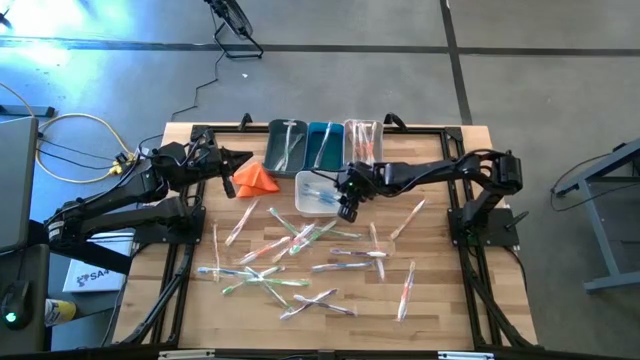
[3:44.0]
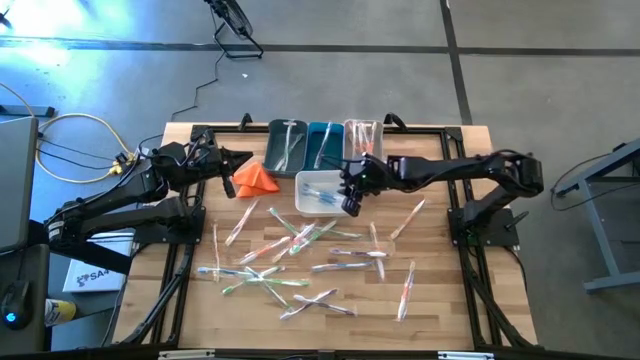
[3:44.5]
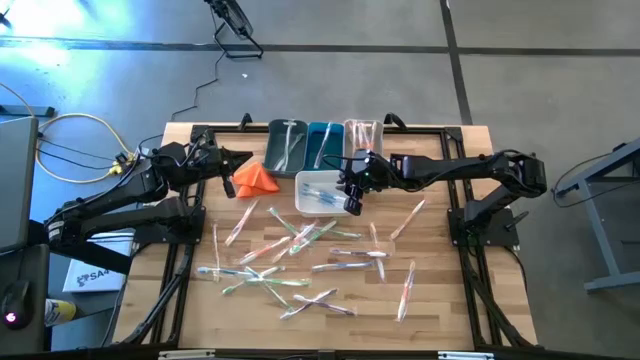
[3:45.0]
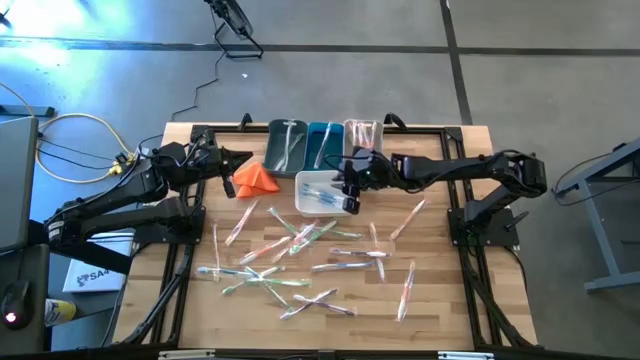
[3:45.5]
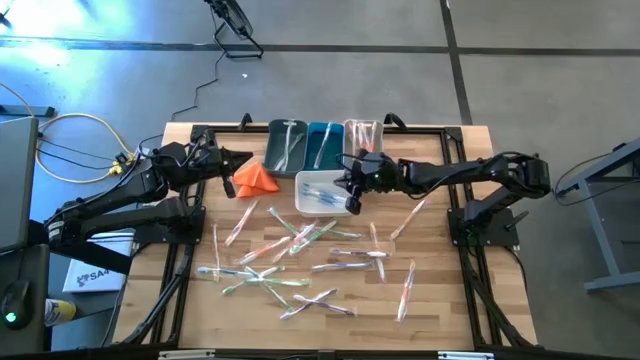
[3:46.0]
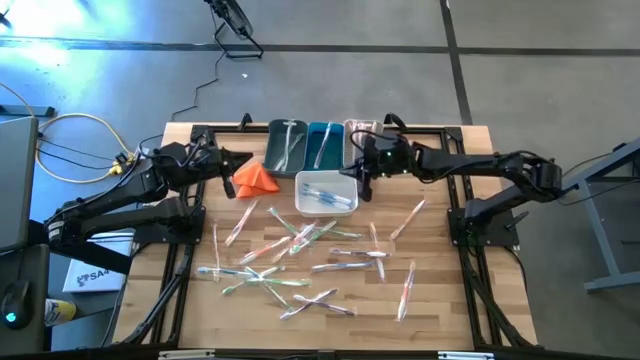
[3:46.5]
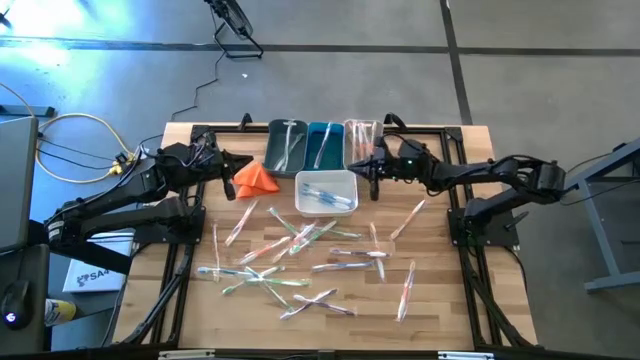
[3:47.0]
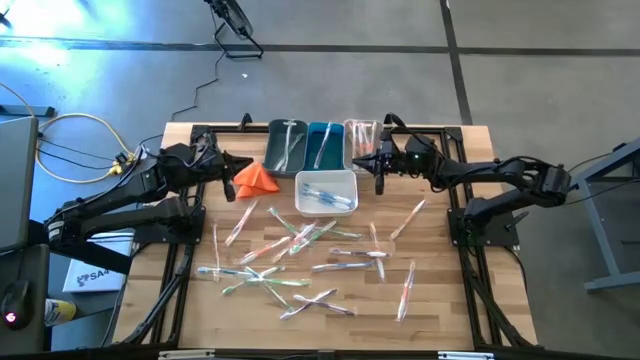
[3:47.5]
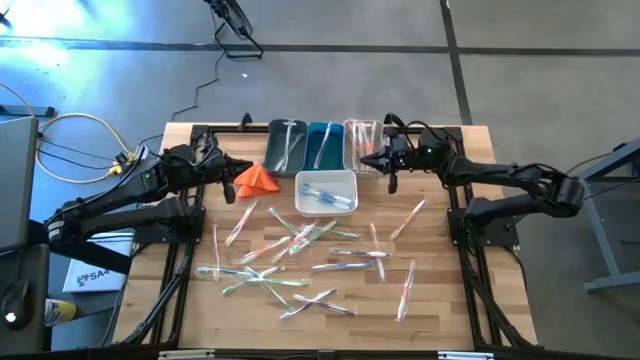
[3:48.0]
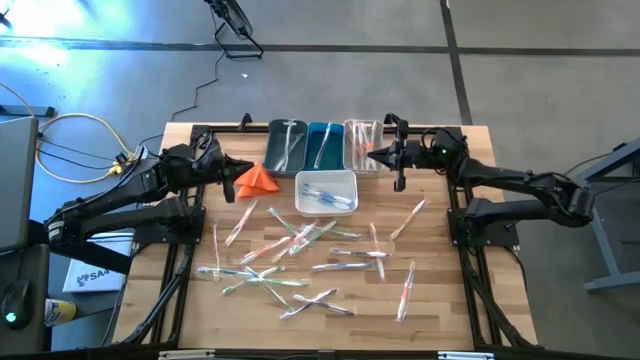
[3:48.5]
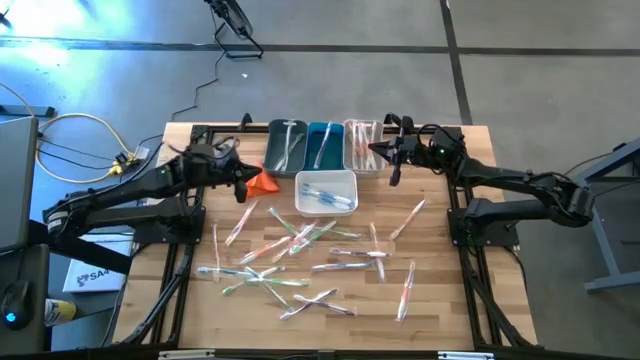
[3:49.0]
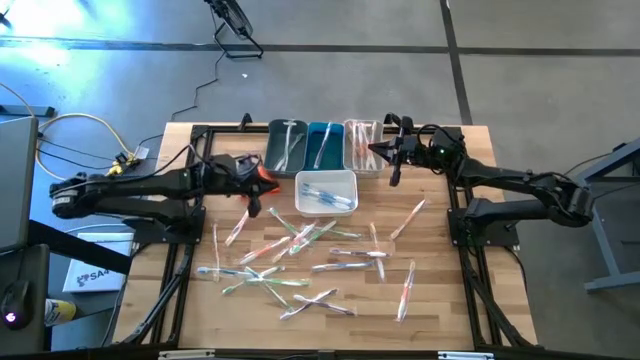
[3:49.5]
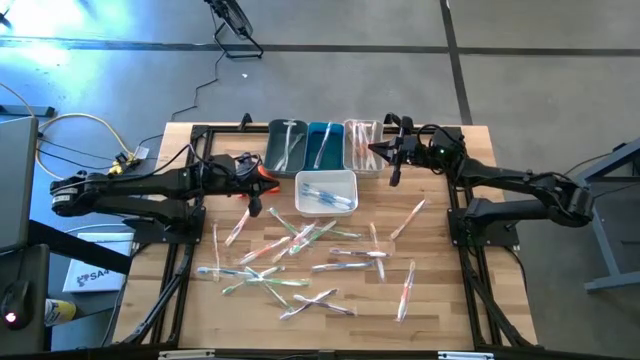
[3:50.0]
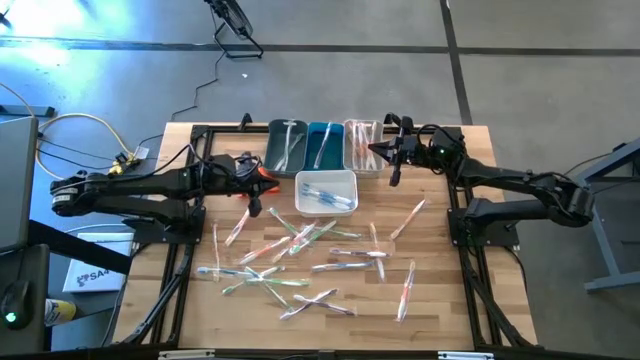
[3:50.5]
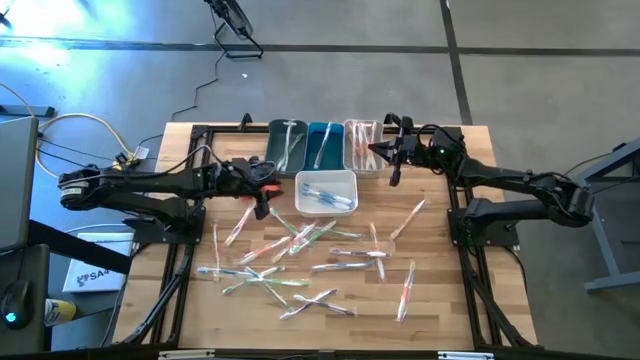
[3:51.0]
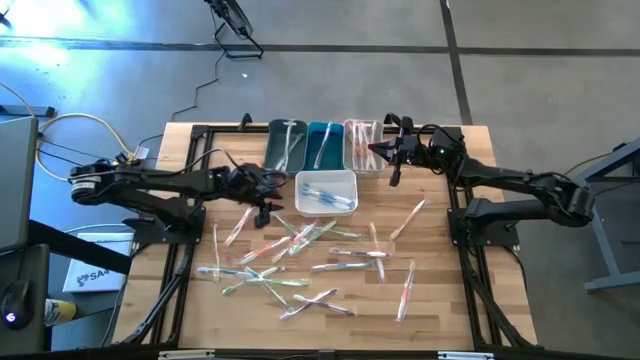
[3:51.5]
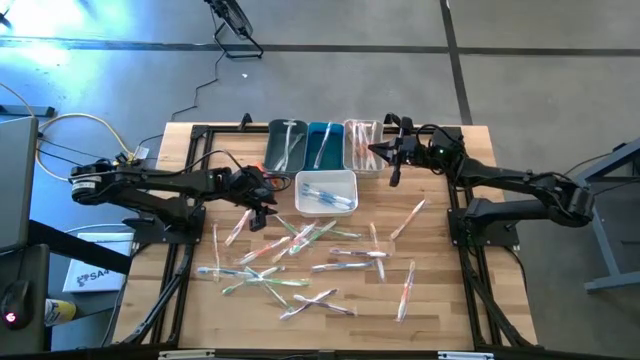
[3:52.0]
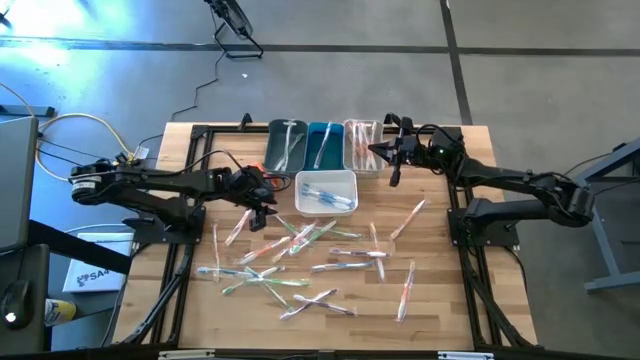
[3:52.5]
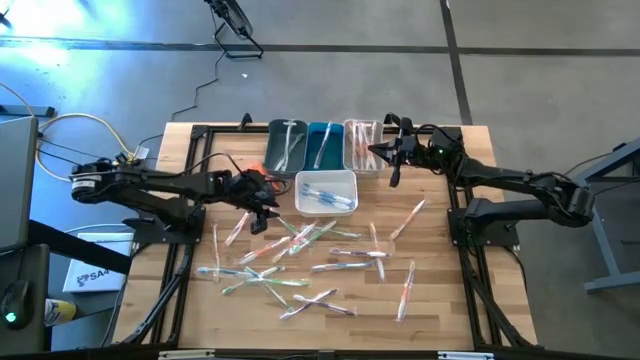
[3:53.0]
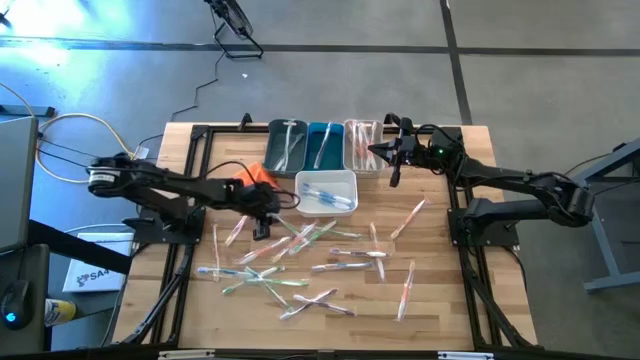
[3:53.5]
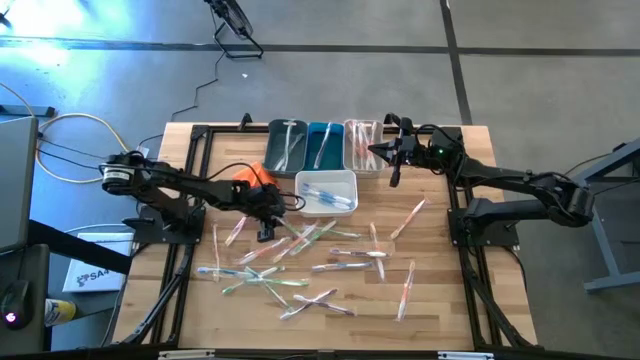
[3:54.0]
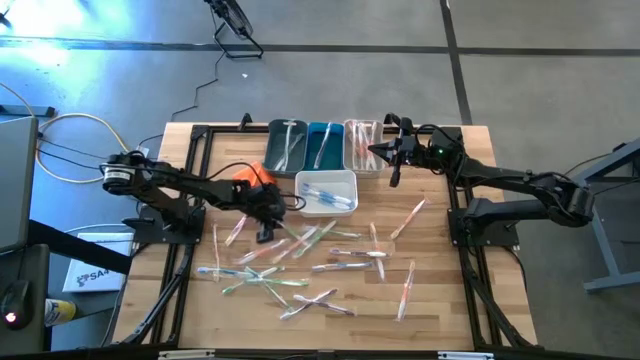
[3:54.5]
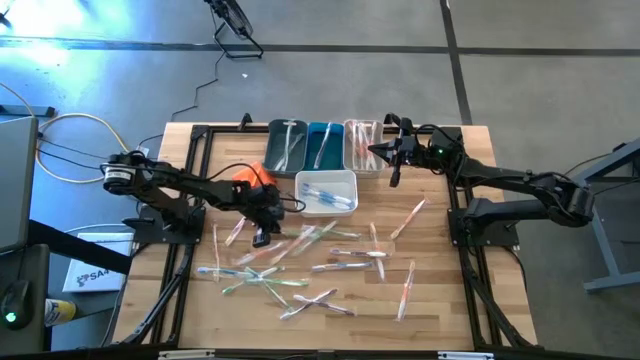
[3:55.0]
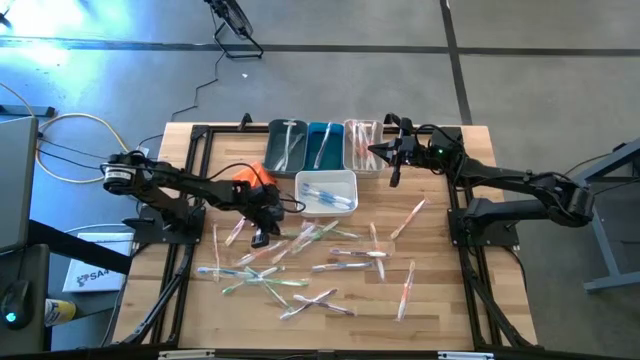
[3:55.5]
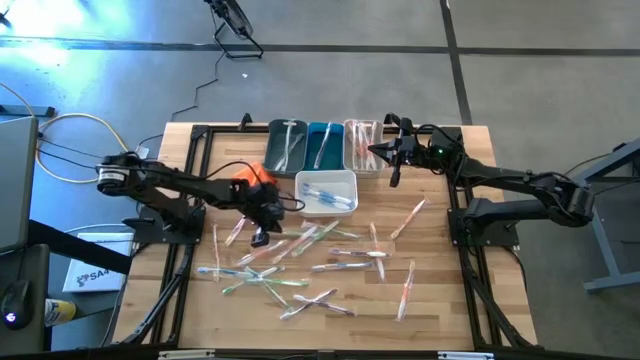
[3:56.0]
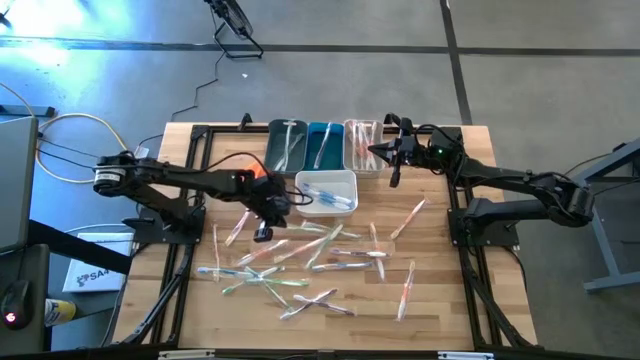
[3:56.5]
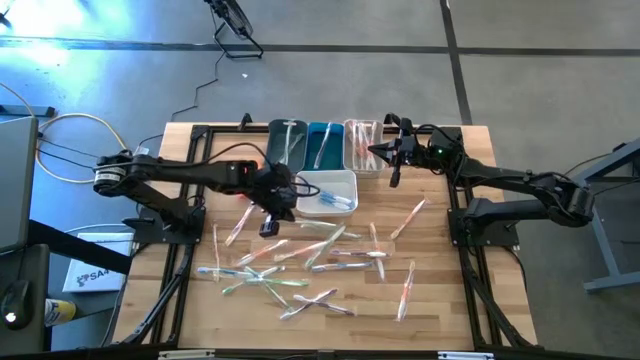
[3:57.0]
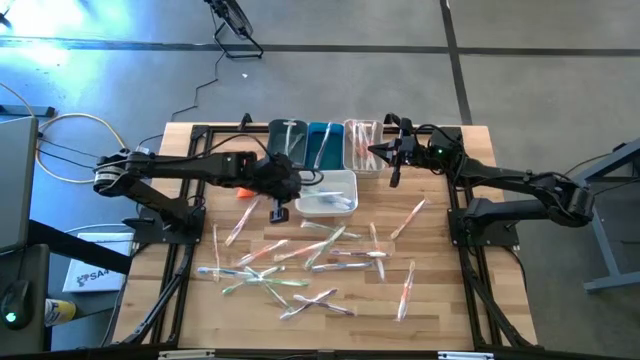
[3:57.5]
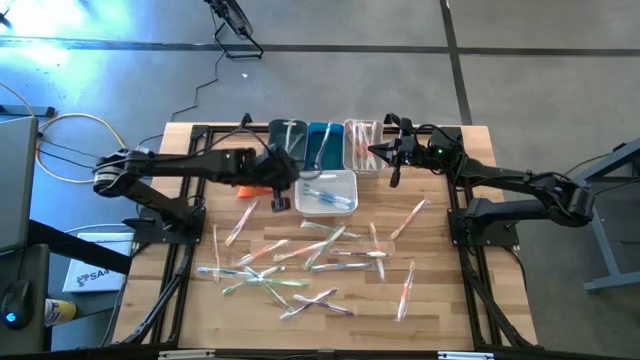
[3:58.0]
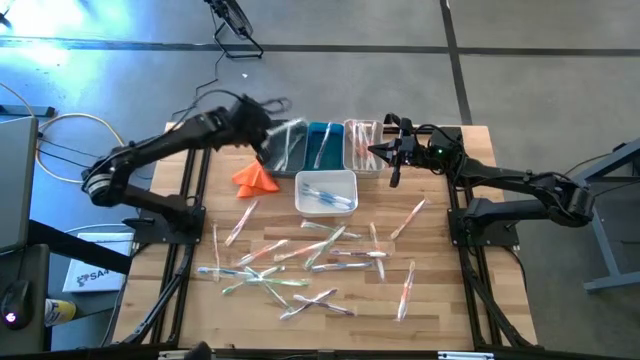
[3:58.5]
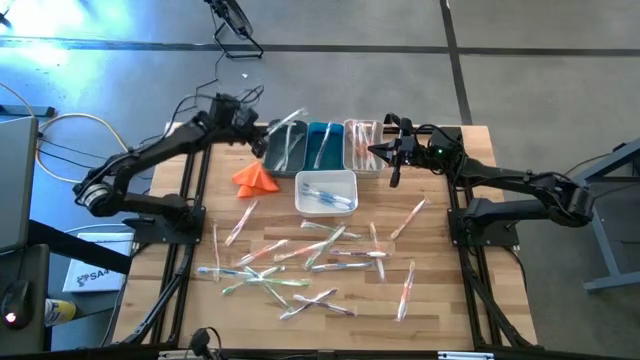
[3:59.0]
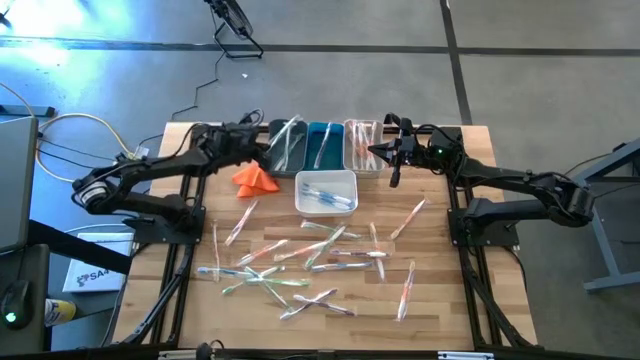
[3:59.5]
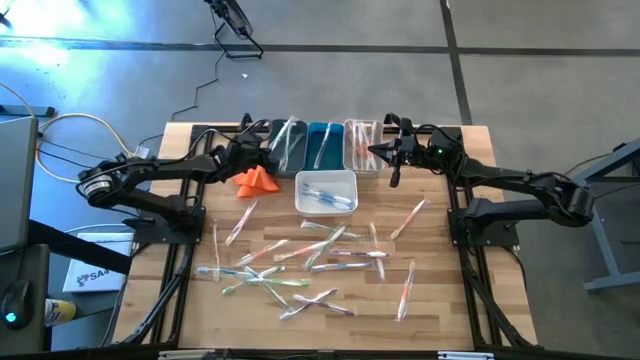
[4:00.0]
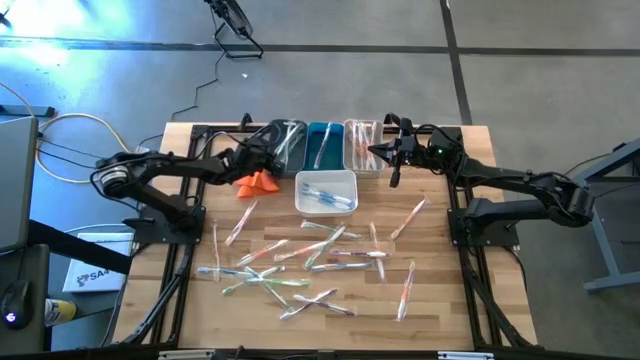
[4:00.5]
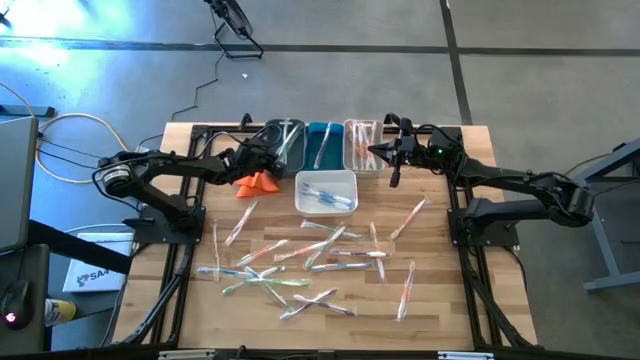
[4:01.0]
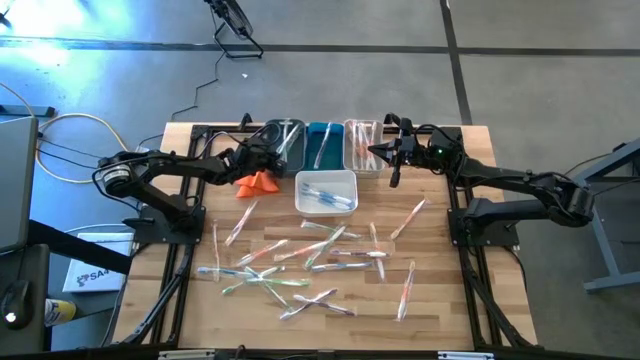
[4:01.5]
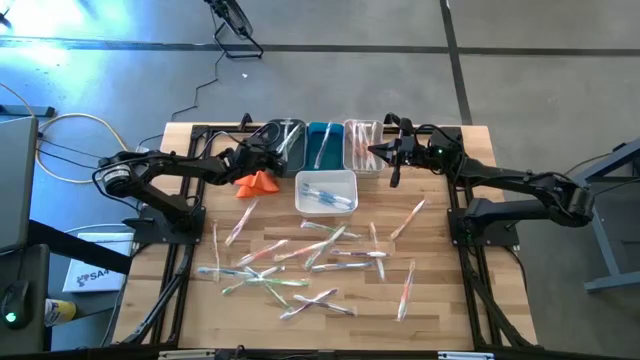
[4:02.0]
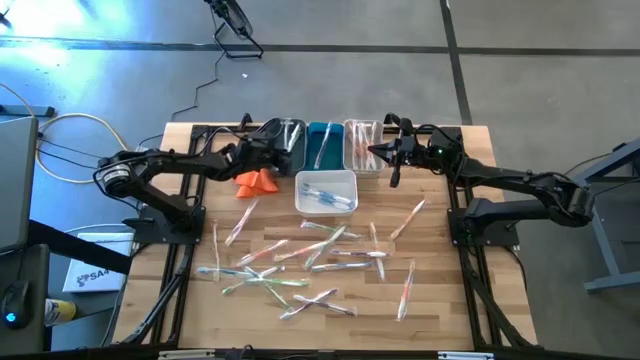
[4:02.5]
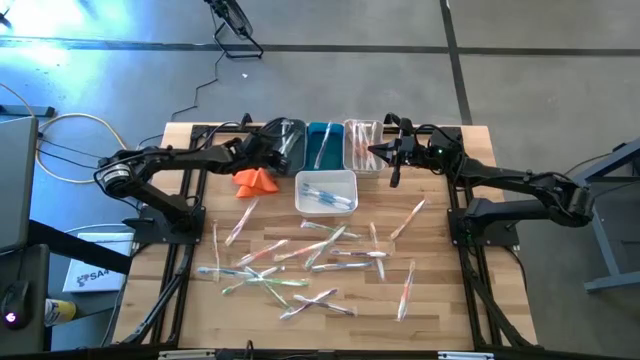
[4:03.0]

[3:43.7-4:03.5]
Task: Pick & Place Toothbrushes
Put the green toothbrush into the dark blue bin

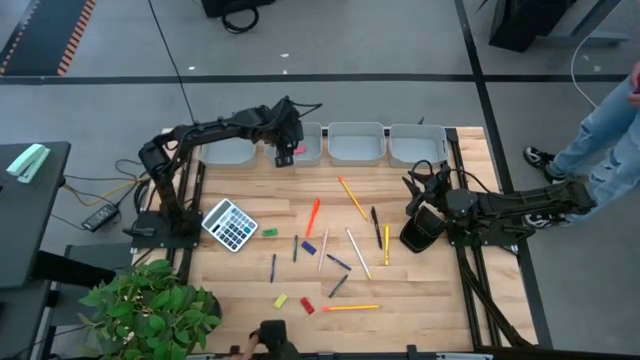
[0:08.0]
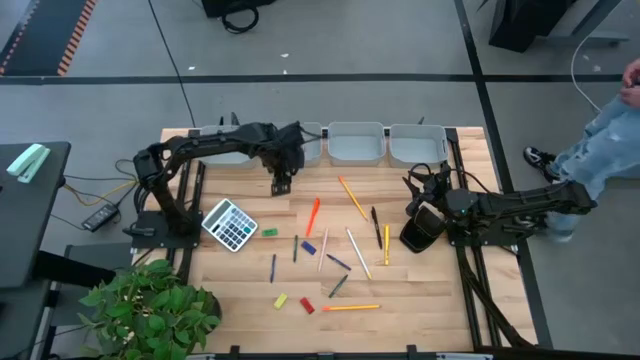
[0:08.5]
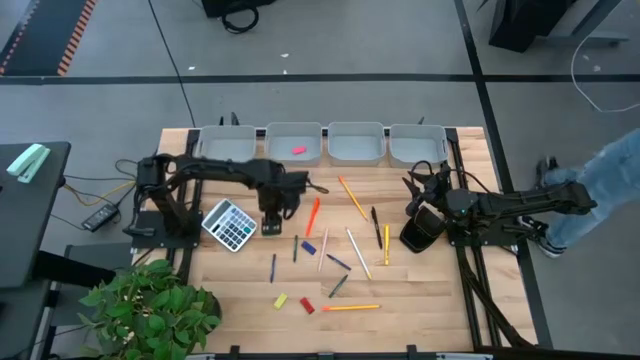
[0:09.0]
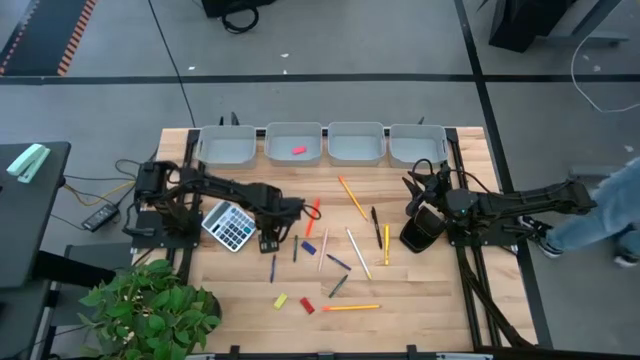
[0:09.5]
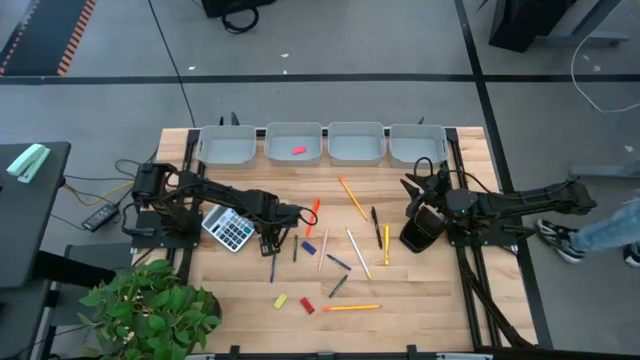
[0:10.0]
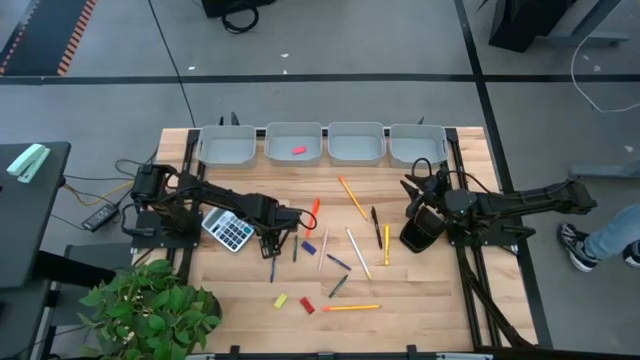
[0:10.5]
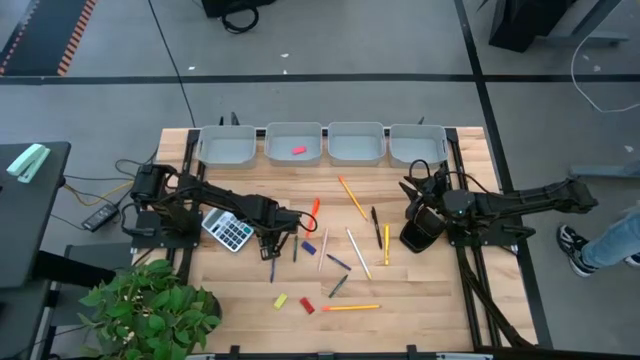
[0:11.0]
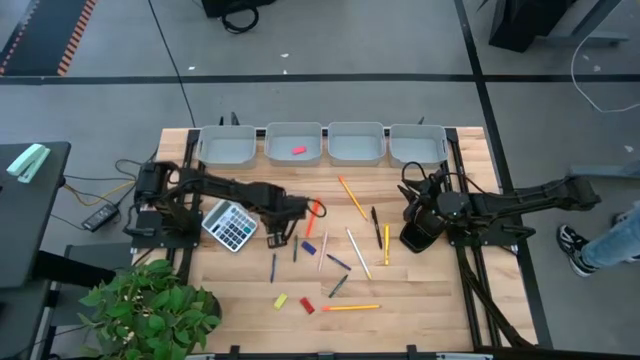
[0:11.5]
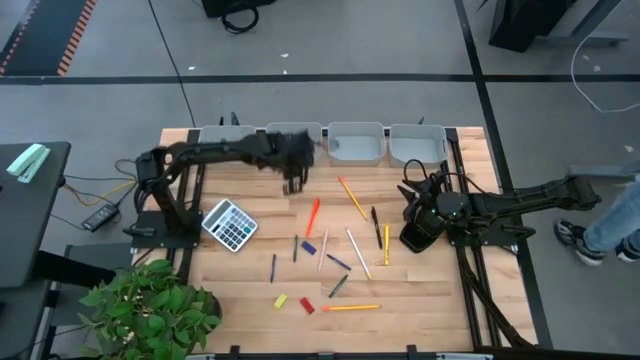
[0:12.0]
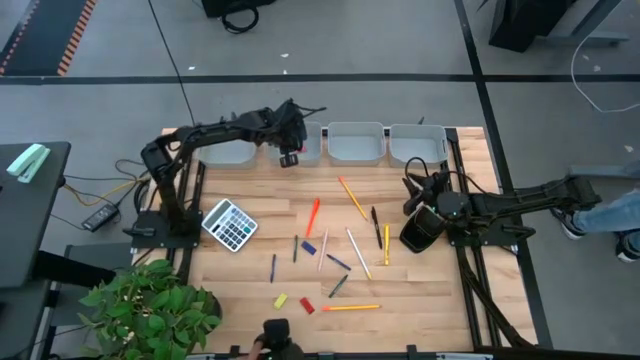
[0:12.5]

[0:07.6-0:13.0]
Task: Sort crayons/erasers/pens/pencils in bins
Put the green eraser into the gray bin
